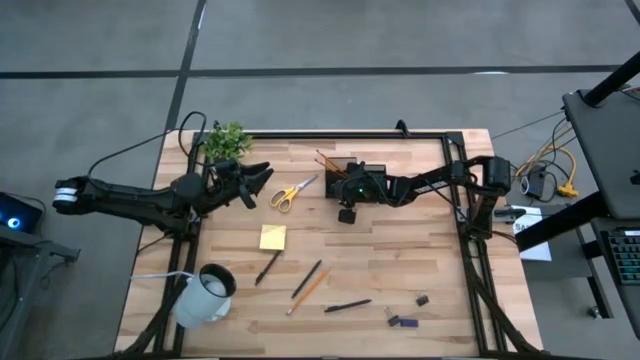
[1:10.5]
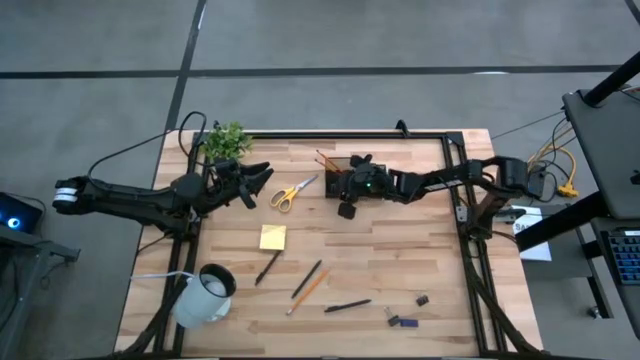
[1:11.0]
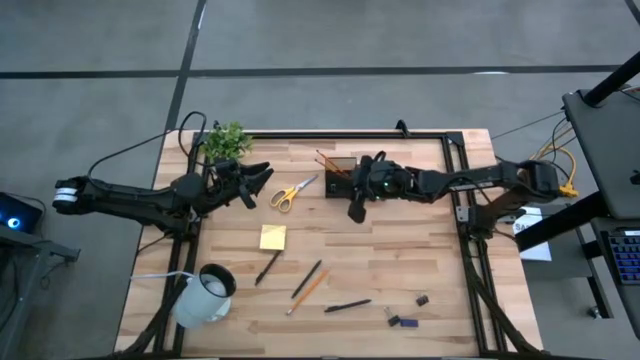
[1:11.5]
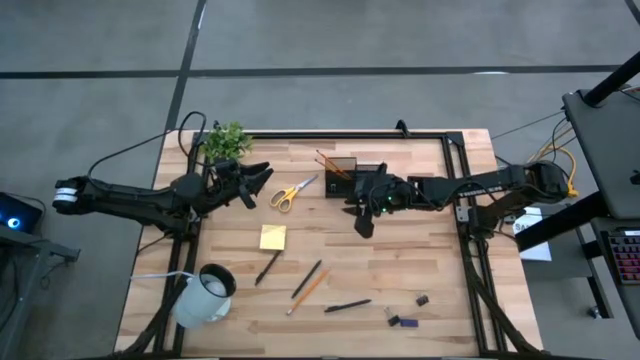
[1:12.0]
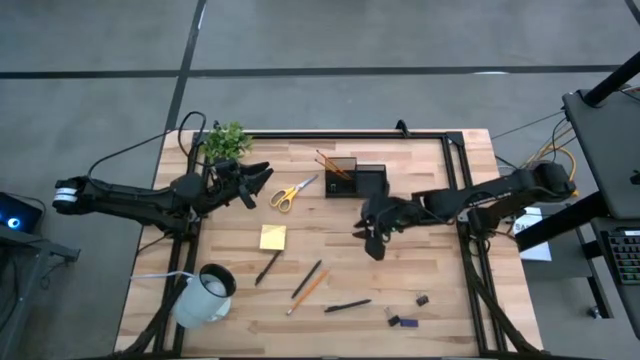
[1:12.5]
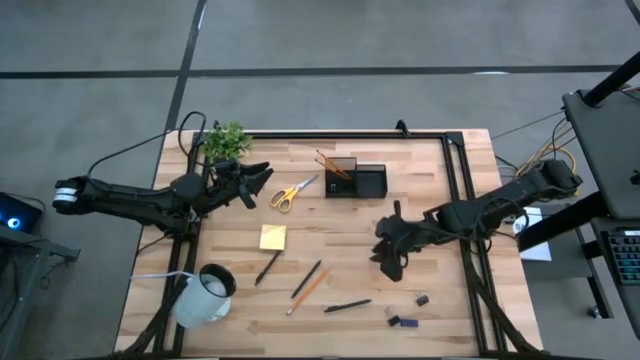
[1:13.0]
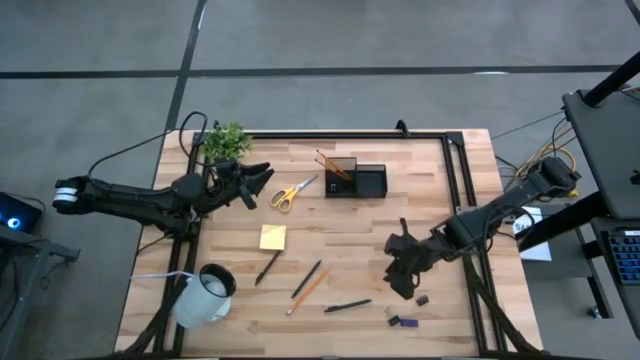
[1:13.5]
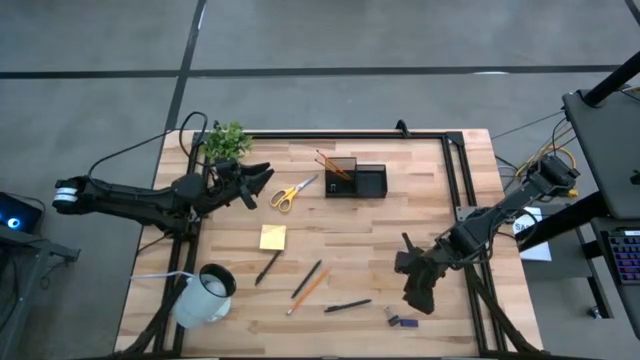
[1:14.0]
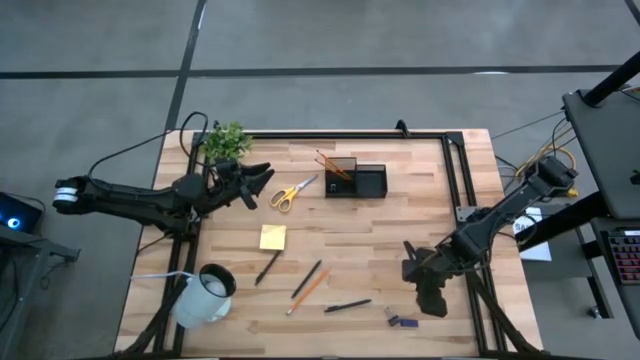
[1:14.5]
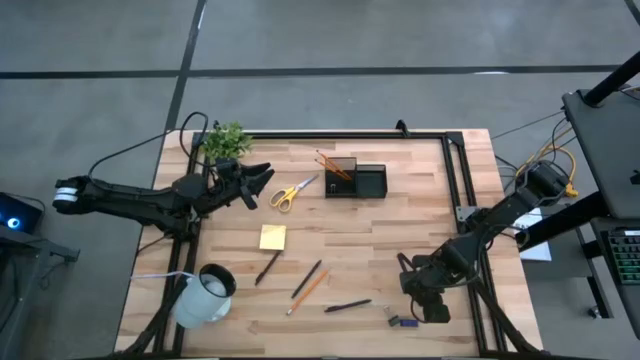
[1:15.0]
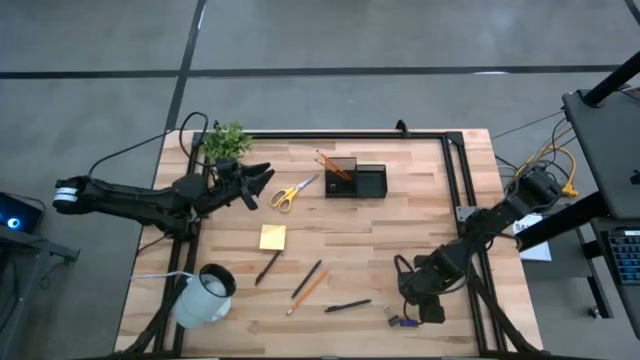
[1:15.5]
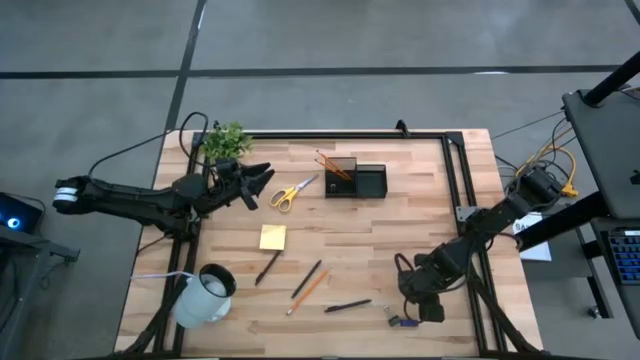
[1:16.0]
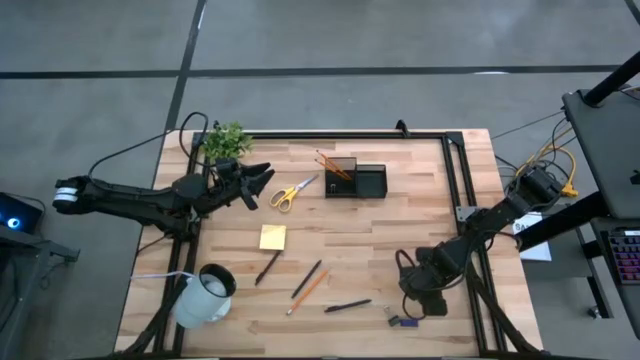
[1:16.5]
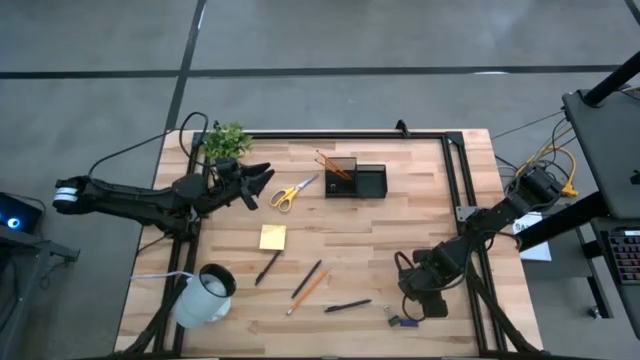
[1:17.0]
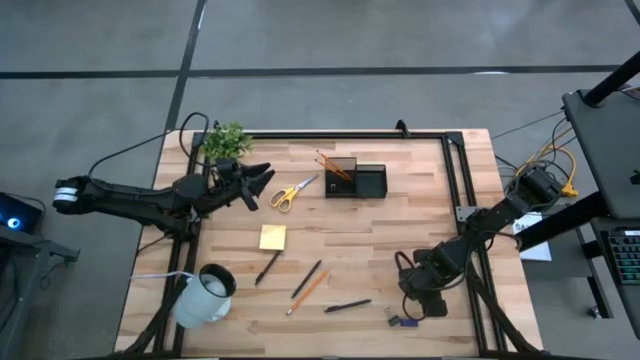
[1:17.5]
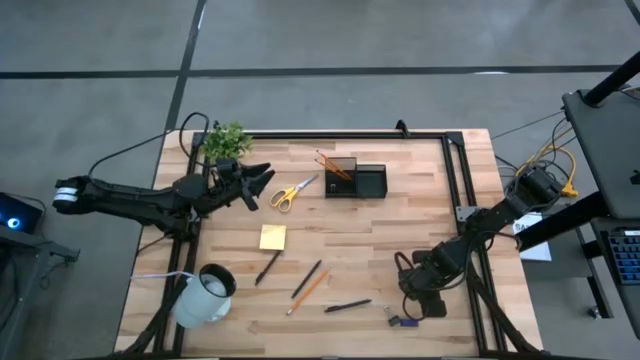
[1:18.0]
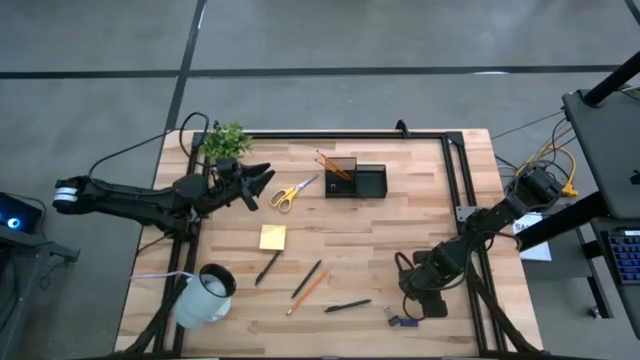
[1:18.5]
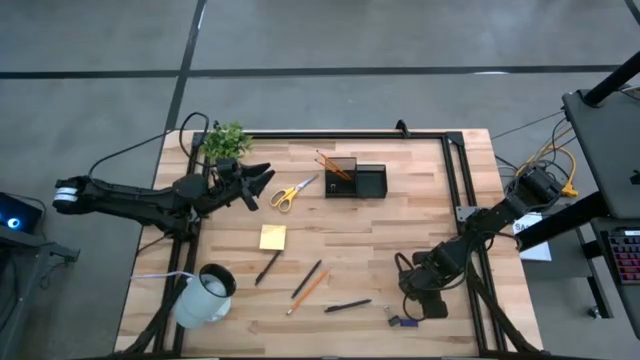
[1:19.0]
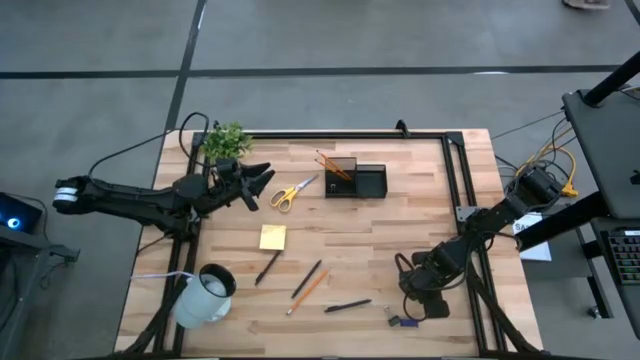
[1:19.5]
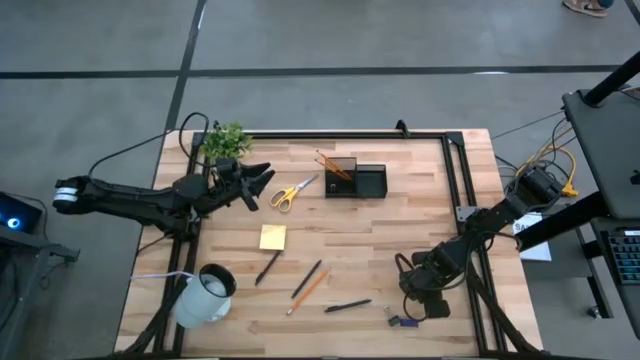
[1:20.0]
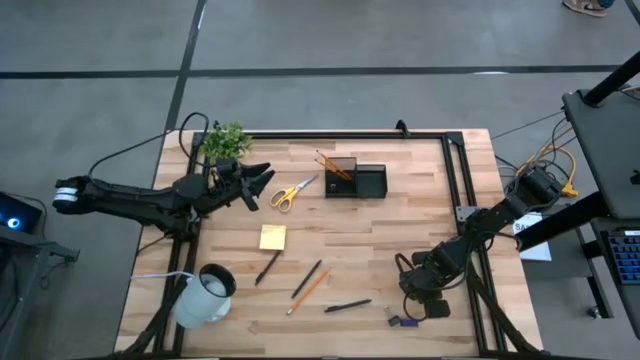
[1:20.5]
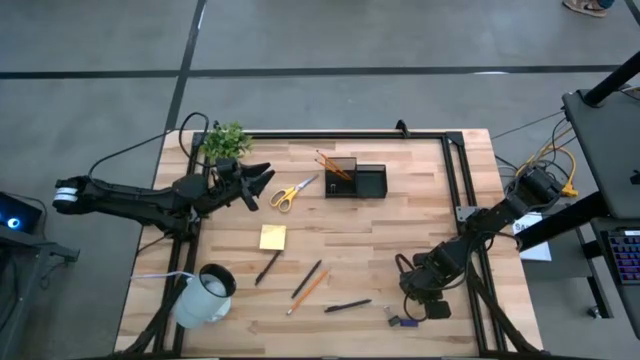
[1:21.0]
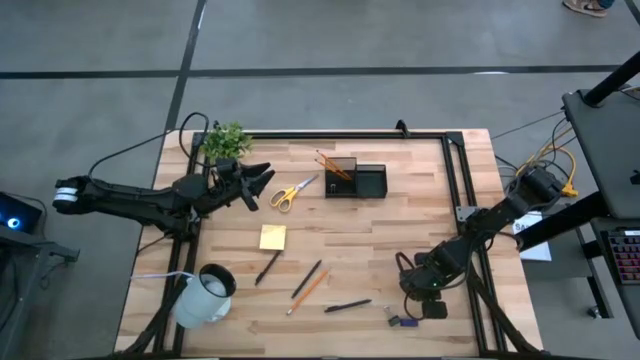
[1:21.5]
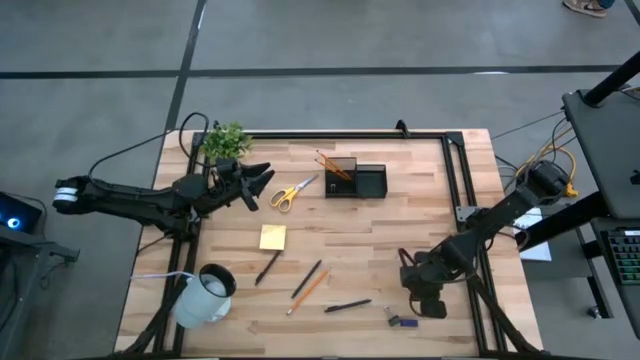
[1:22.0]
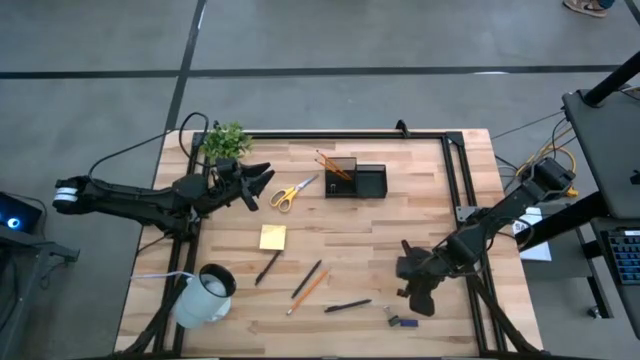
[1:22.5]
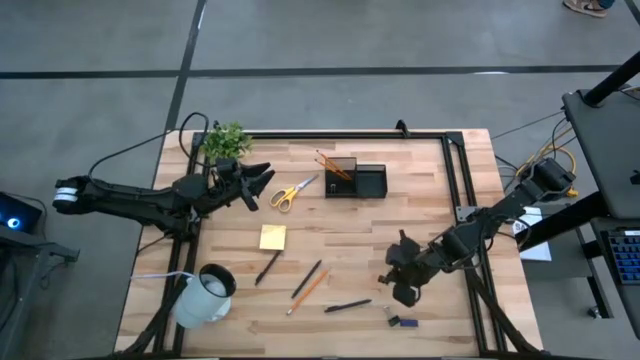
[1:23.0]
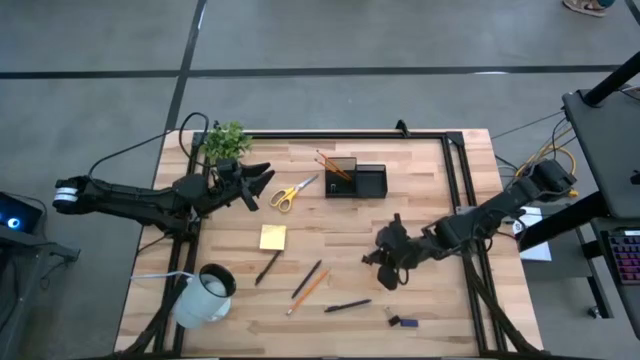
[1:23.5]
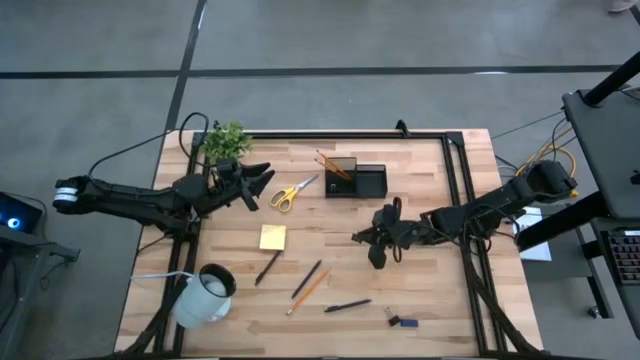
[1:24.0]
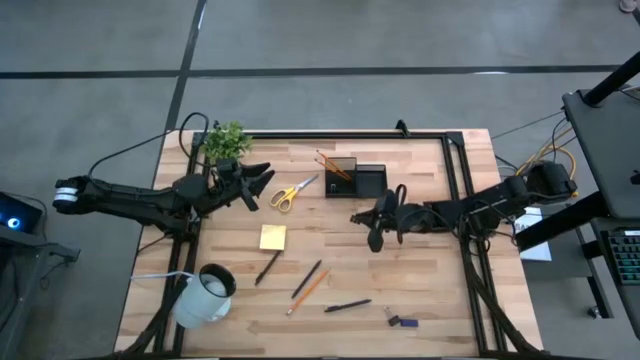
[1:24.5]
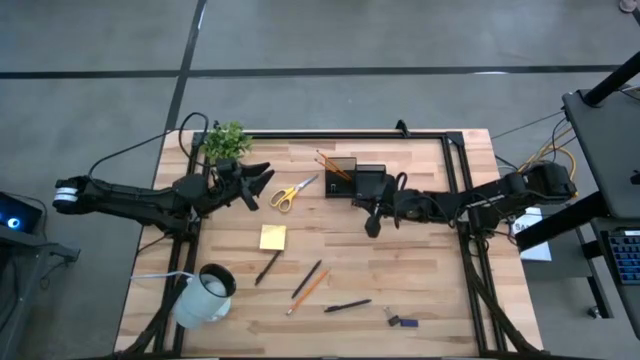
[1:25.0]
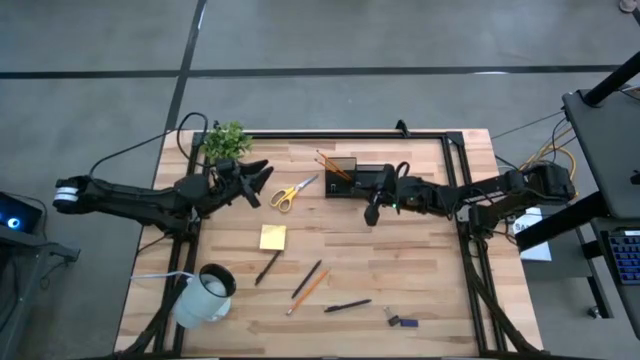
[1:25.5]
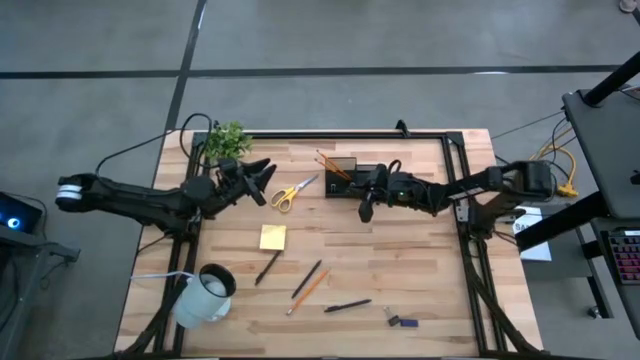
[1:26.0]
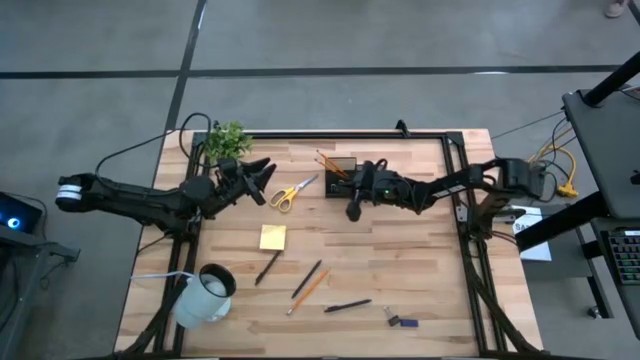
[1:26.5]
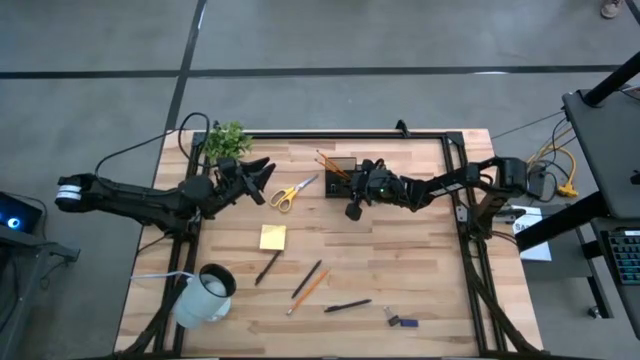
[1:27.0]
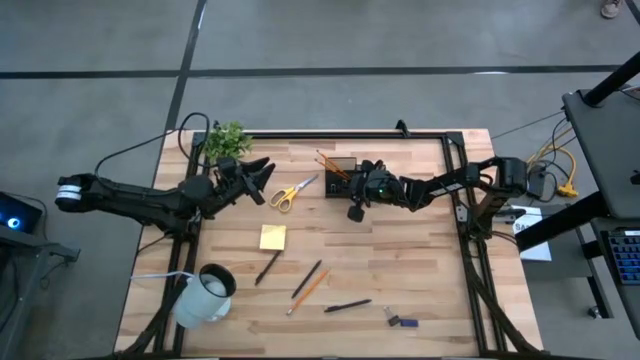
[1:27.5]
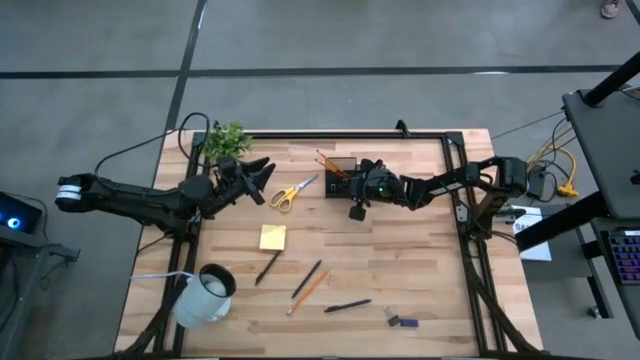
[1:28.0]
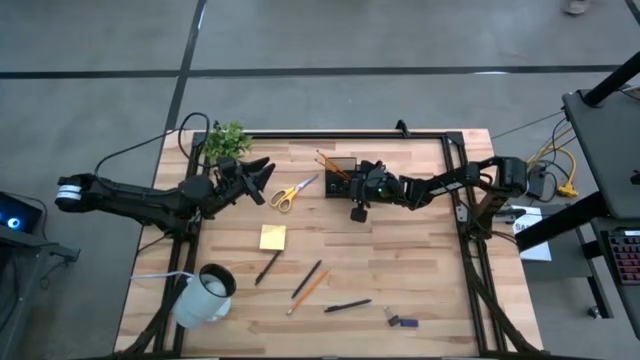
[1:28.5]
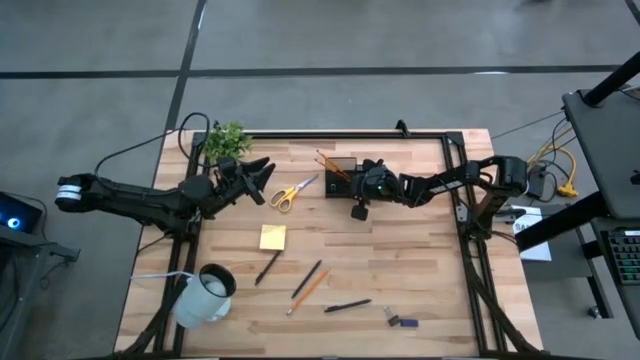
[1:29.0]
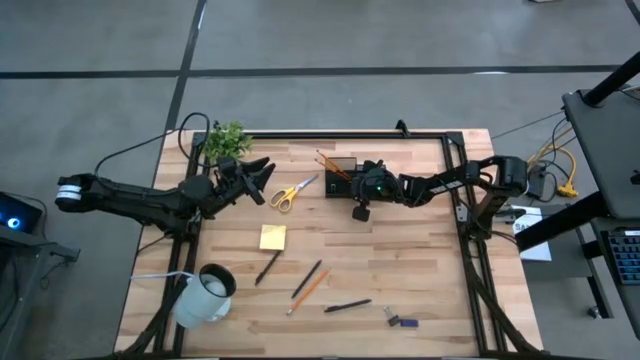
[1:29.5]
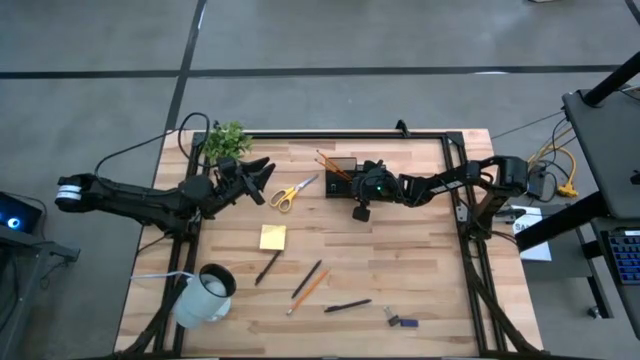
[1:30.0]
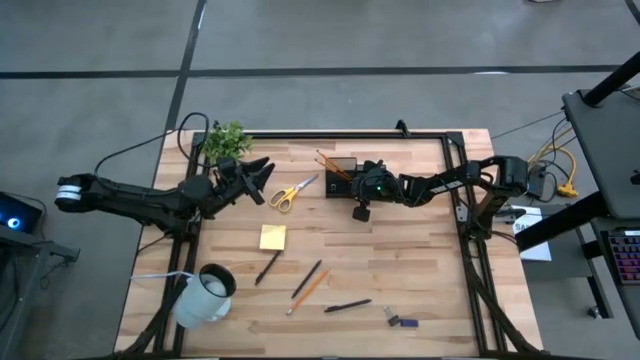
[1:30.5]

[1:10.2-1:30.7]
Task: Pick and place office supplies into organizer
Put the right binder clip into the desk organizer
